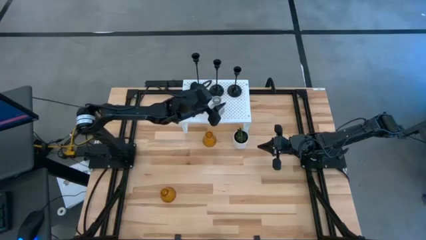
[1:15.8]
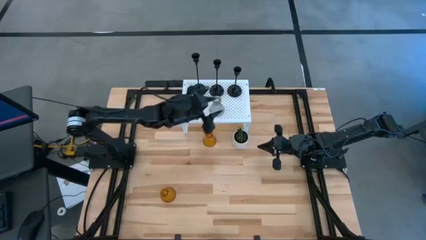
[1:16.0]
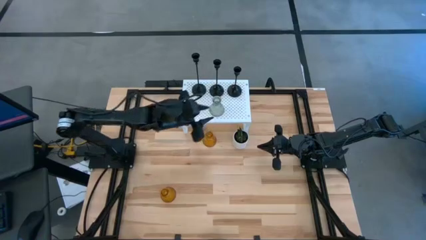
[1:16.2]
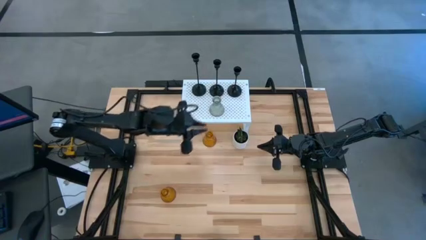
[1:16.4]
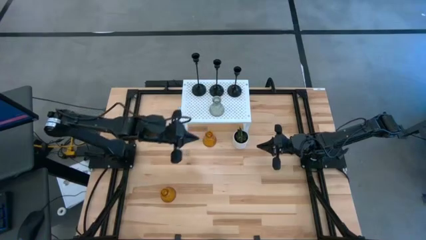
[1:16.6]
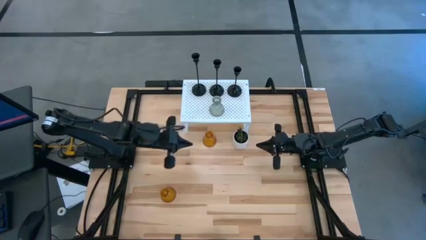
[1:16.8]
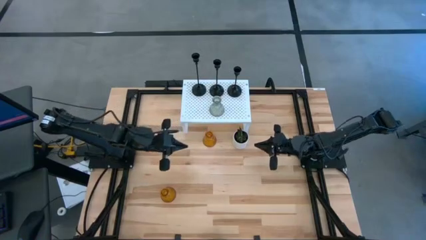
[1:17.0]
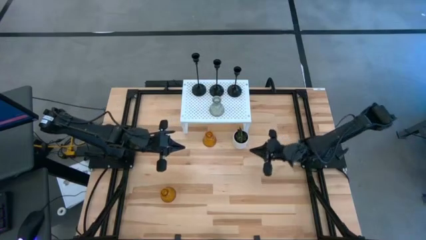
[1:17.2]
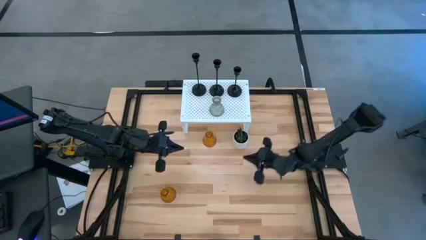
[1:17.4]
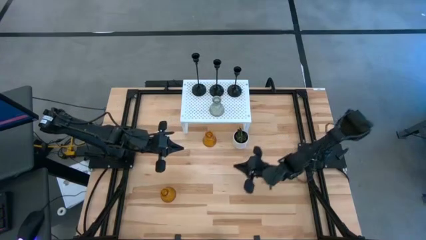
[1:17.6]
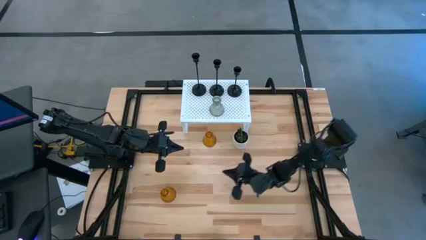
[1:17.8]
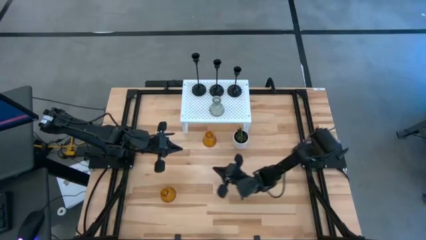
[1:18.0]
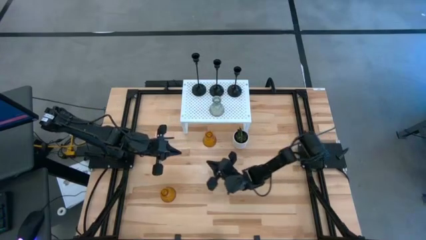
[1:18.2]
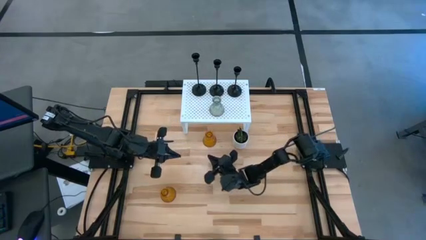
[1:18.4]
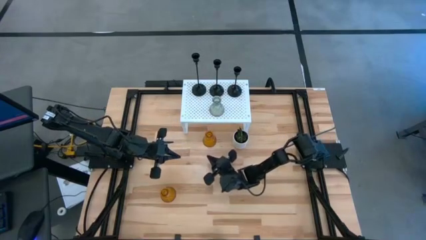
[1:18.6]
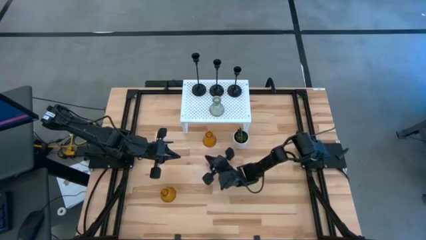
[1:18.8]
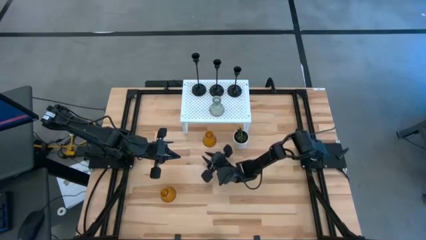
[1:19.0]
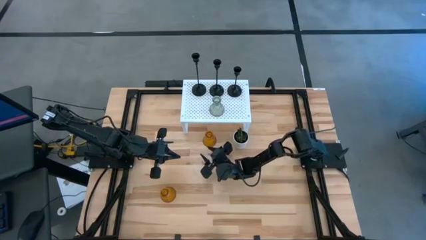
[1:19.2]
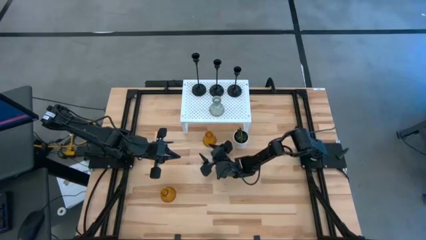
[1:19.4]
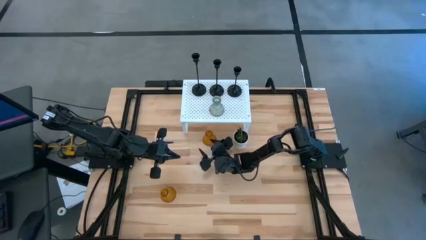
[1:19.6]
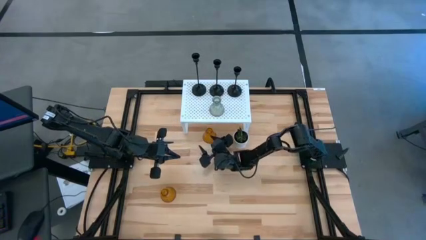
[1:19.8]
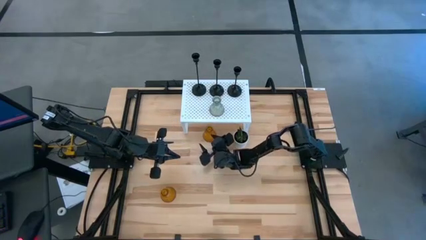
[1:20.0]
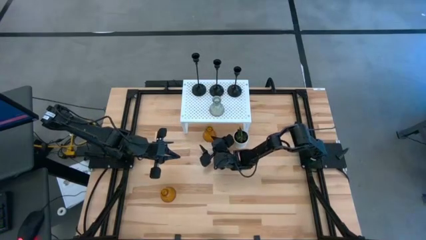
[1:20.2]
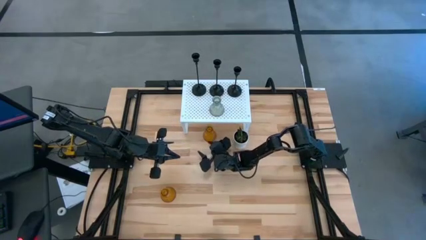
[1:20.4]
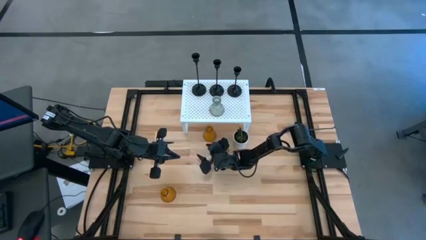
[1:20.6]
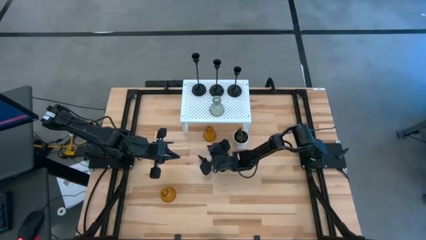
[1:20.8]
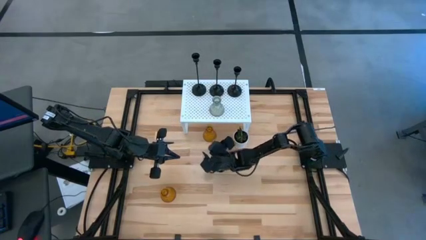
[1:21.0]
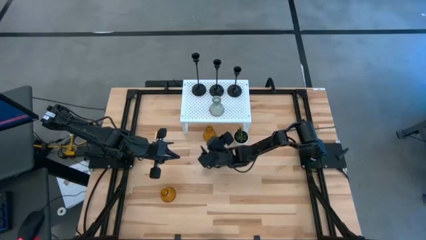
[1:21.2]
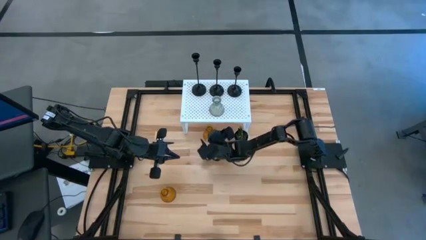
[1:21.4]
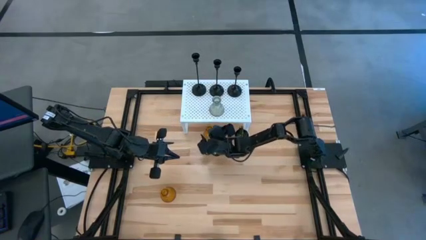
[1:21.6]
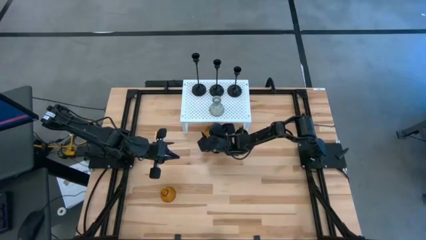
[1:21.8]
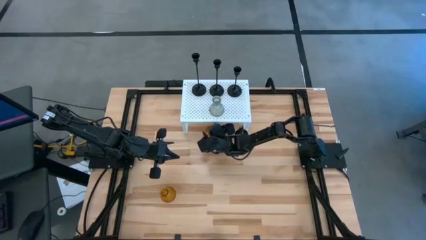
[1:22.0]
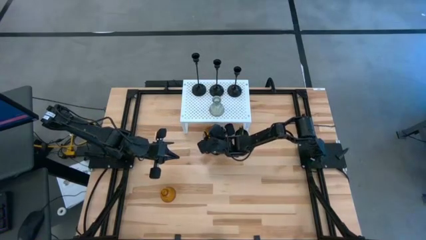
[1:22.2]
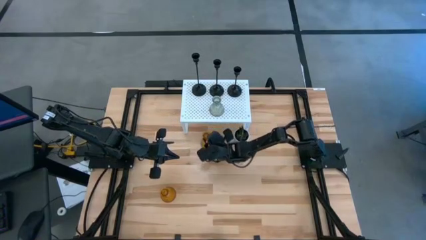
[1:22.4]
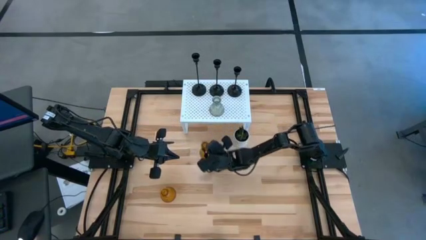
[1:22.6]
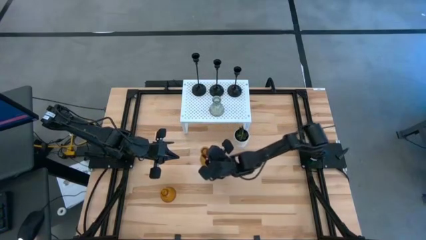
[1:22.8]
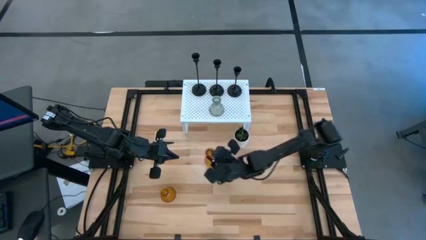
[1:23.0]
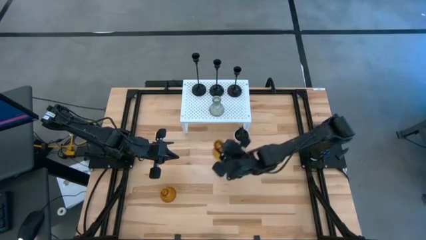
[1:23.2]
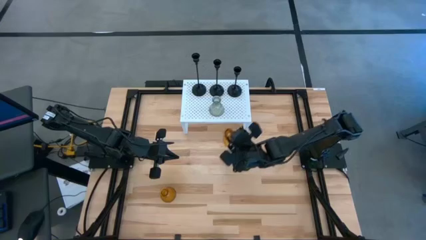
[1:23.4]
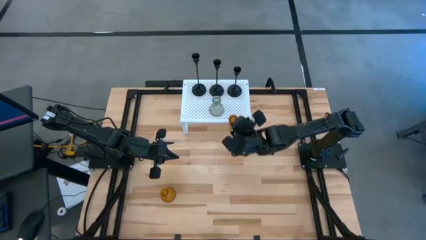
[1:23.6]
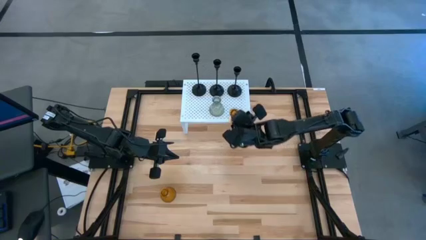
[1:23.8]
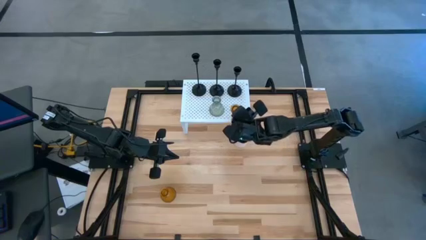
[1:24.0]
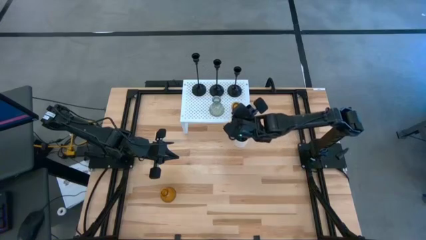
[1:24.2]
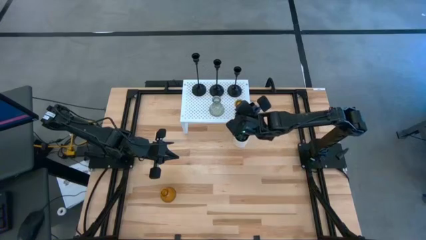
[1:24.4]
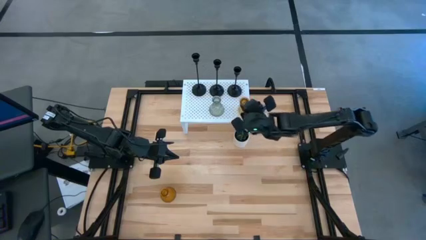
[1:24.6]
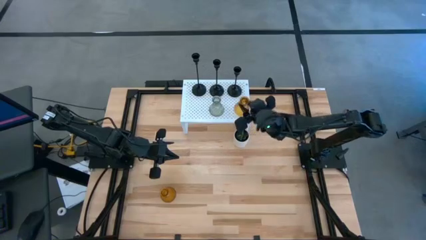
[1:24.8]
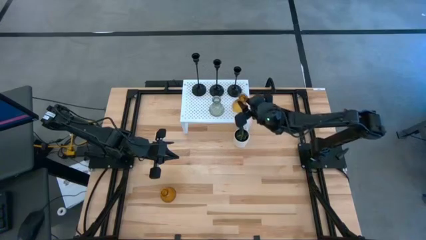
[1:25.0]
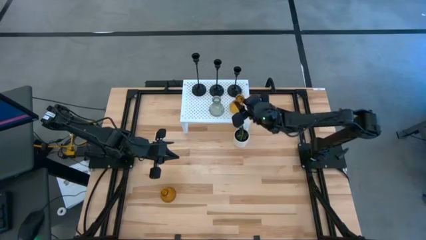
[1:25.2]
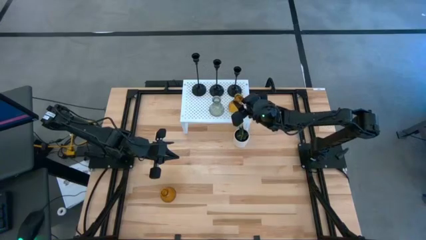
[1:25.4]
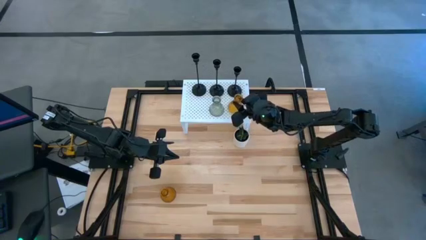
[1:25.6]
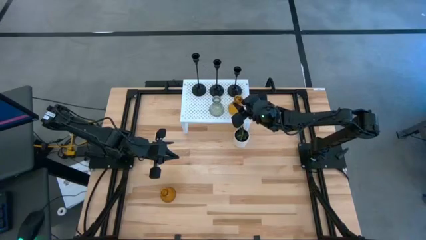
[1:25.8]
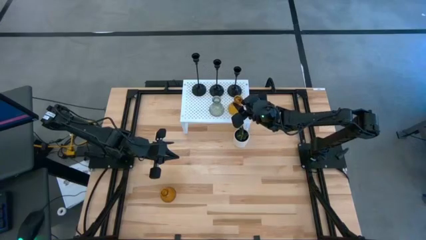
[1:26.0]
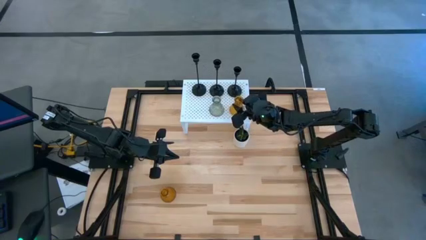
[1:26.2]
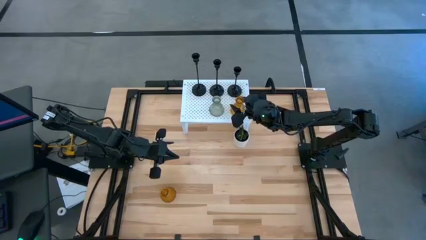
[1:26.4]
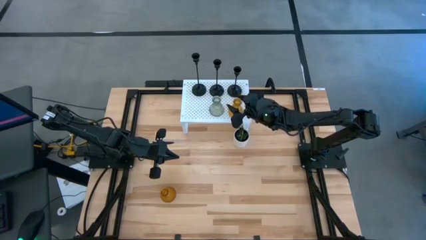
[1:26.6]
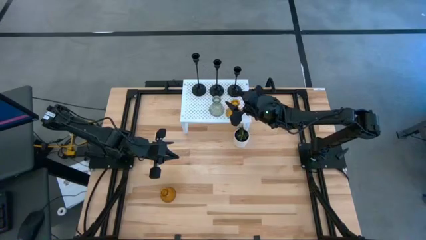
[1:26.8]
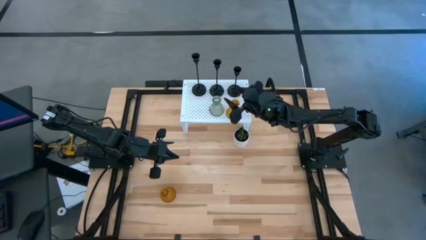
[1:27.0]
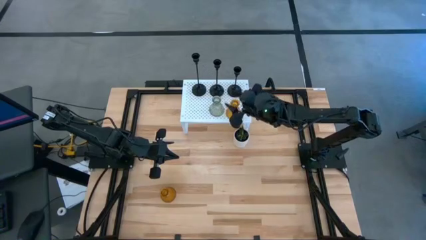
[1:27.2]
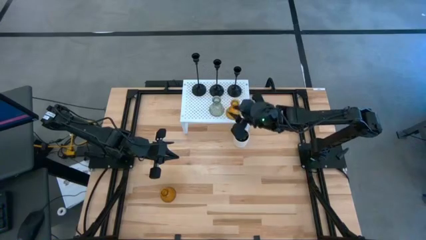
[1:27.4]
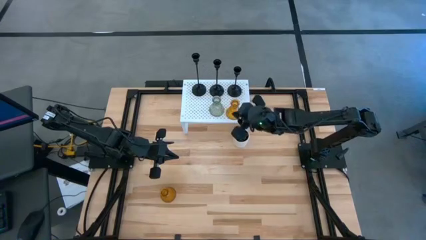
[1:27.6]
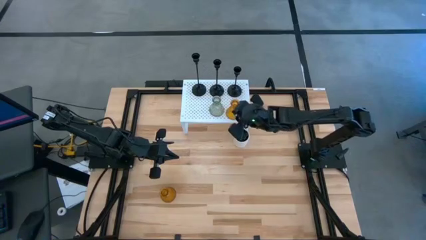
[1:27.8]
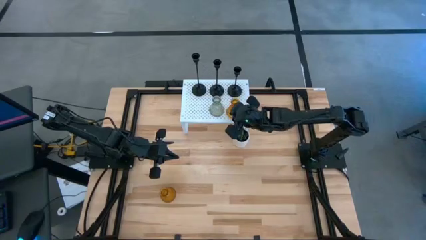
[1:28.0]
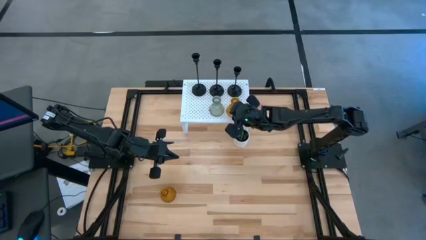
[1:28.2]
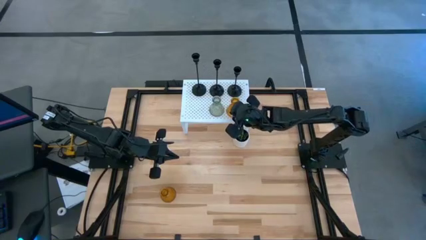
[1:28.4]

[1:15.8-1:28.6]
Task: Pick & Place candle stick holders
Put the top orange glass candle holder on the shelf

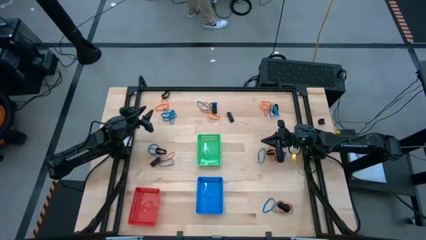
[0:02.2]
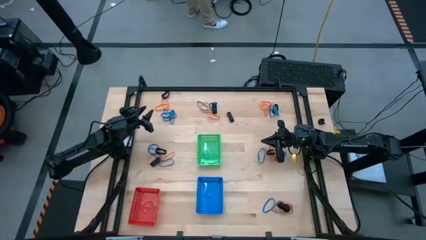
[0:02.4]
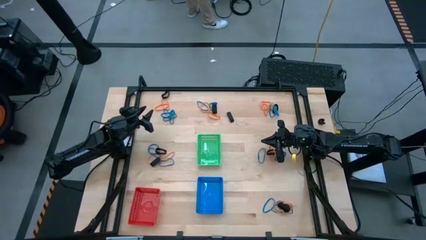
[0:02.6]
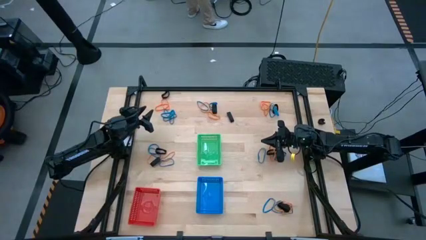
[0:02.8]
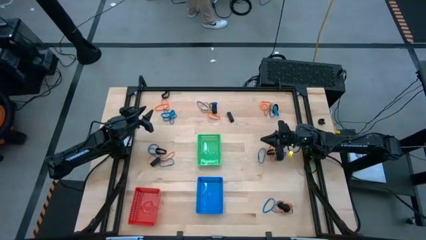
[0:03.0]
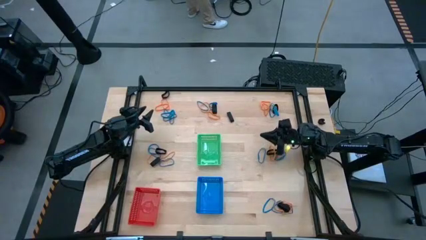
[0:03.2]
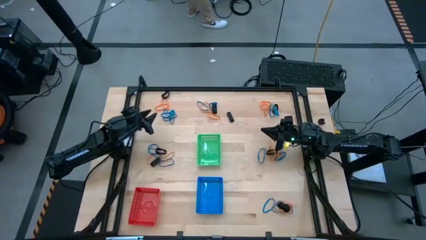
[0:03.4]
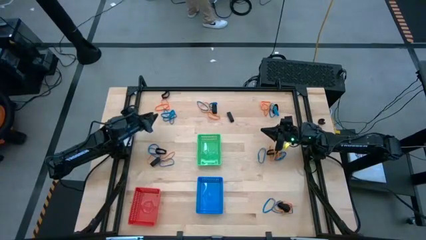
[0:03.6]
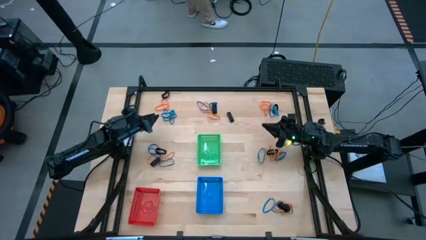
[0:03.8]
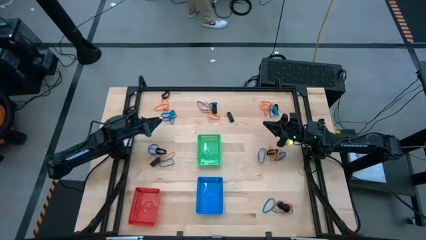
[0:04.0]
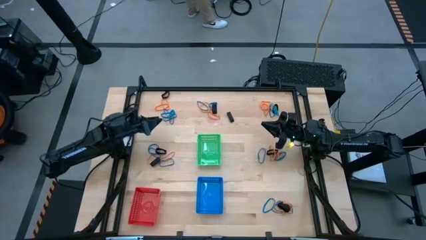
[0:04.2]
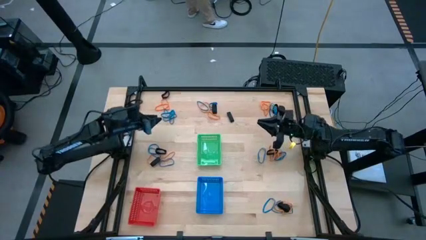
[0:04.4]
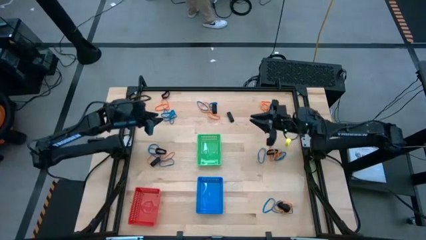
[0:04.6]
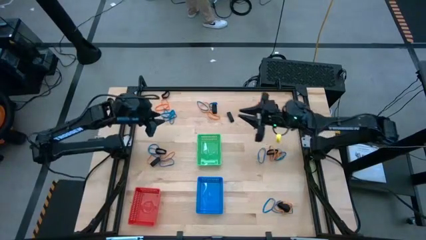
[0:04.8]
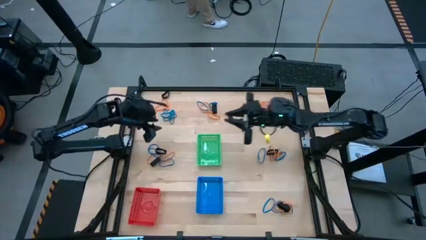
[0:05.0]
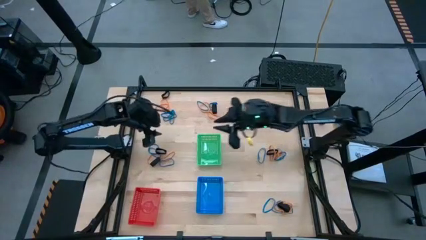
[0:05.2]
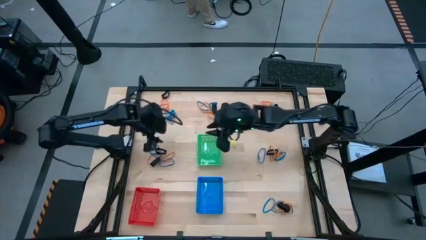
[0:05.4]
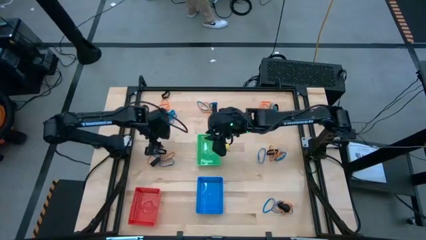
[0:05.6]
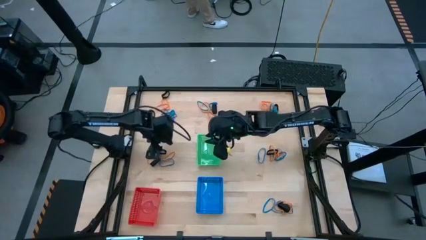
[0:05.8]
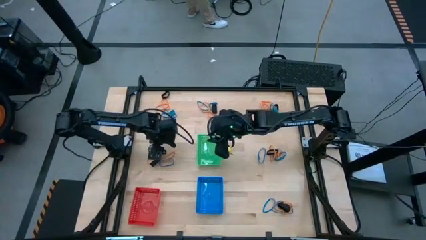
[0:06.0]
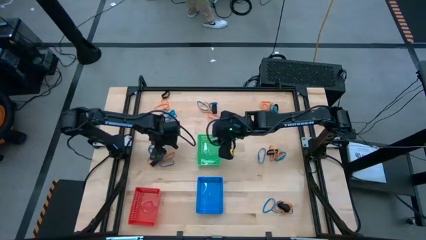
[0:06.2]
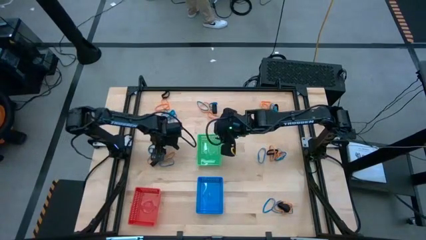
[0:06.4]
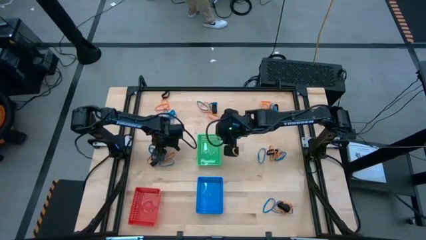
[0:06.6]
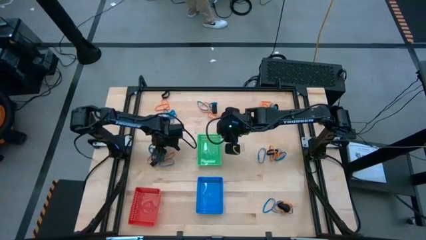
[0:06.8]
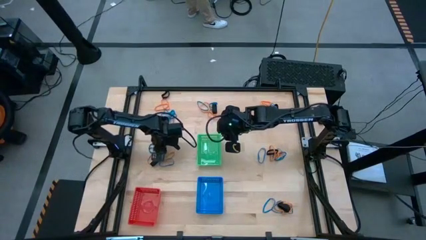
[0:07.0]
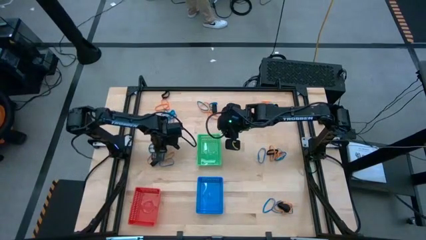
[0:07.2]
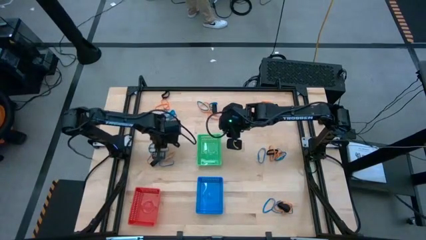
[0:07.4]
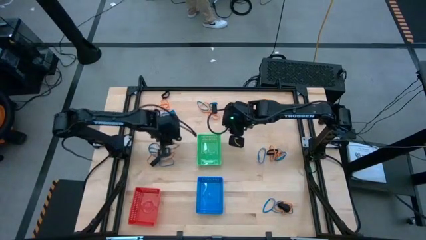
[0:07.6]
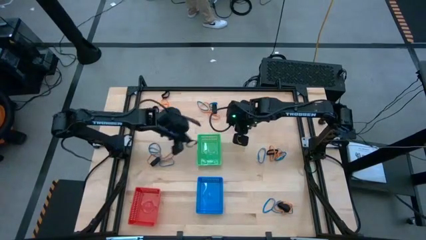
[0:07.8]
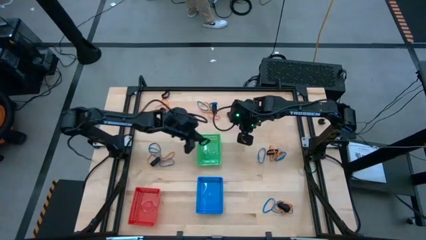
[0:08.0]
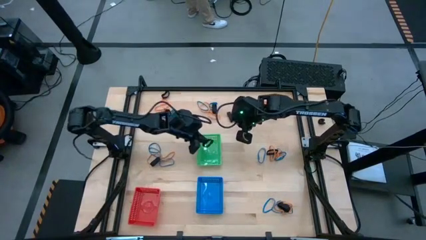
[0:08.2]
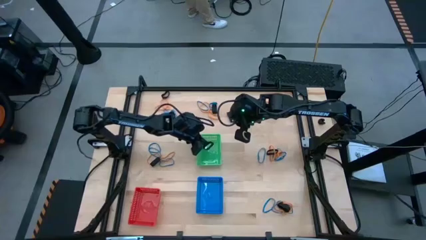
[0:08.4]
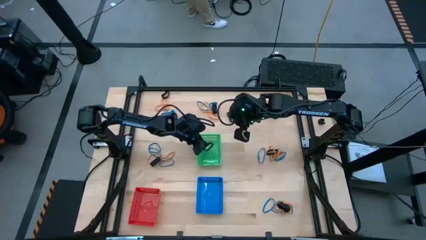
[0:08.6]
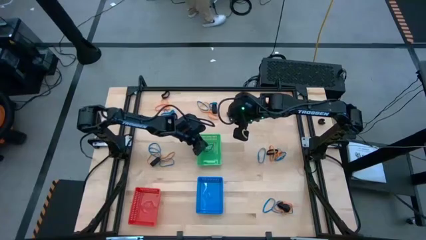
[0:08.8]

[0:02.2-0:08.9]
Task: Sort rubber bands into baskets
Put the black rubberband into the green bin
